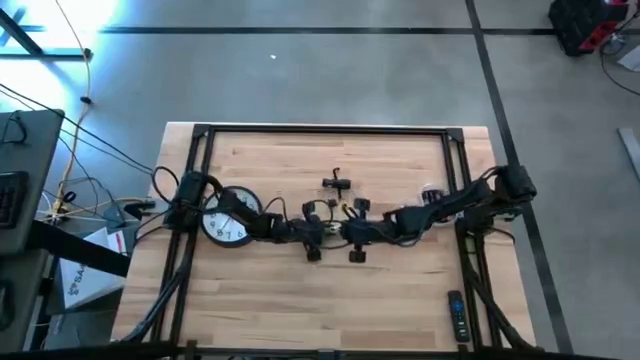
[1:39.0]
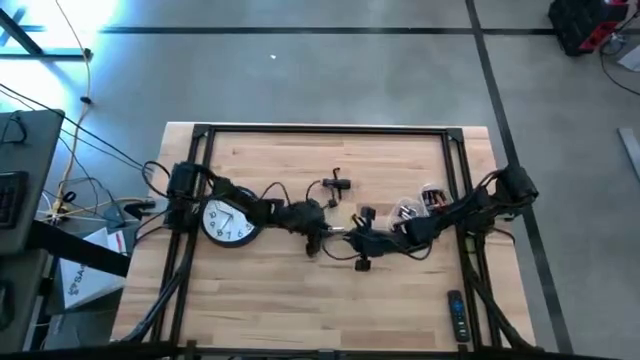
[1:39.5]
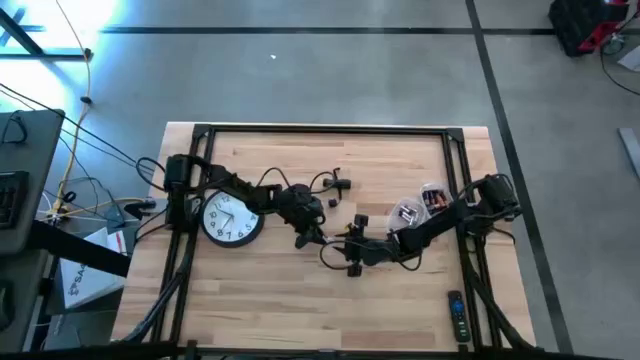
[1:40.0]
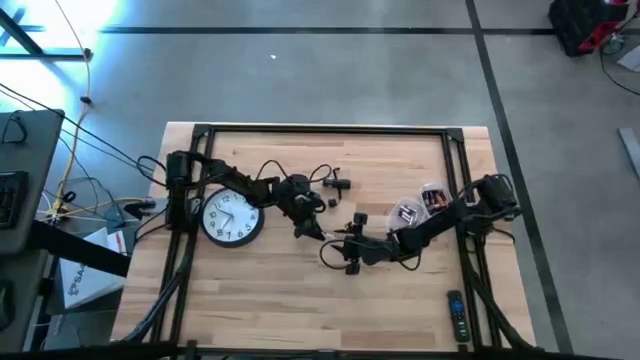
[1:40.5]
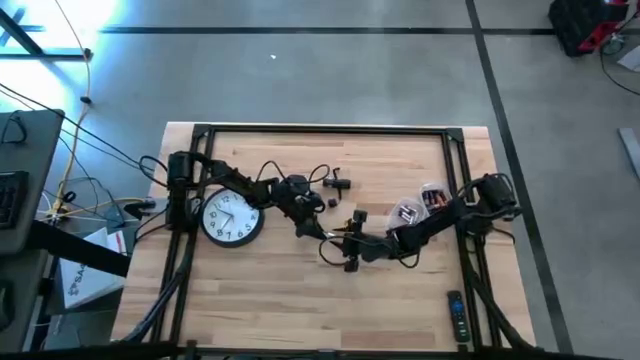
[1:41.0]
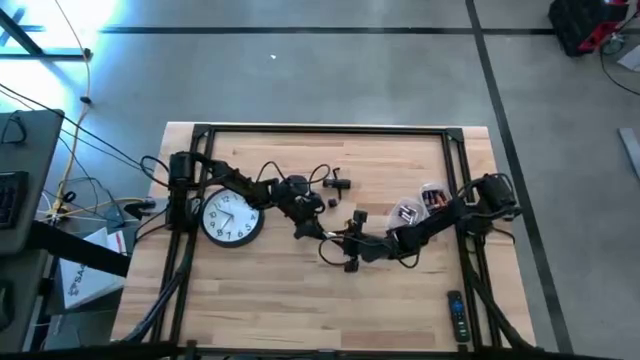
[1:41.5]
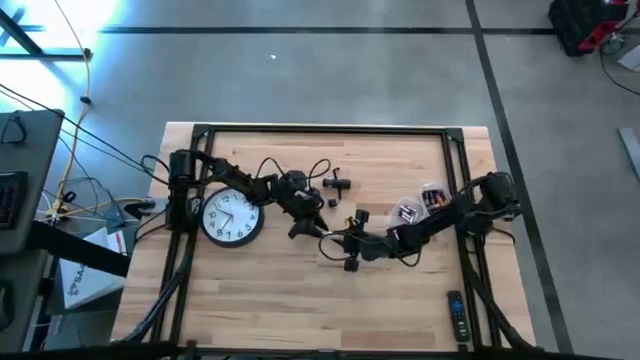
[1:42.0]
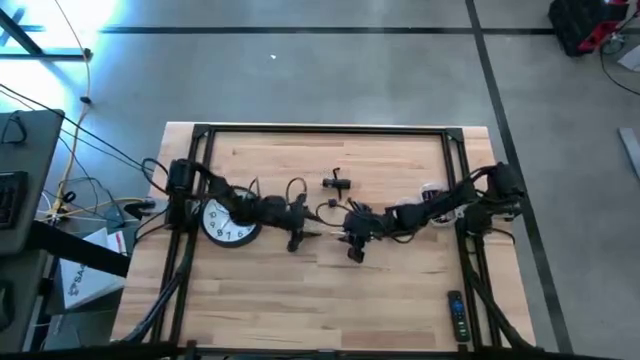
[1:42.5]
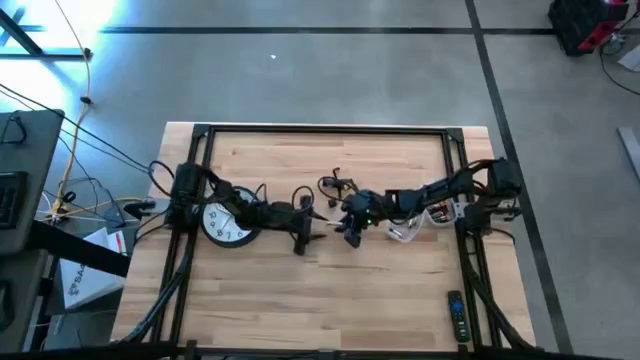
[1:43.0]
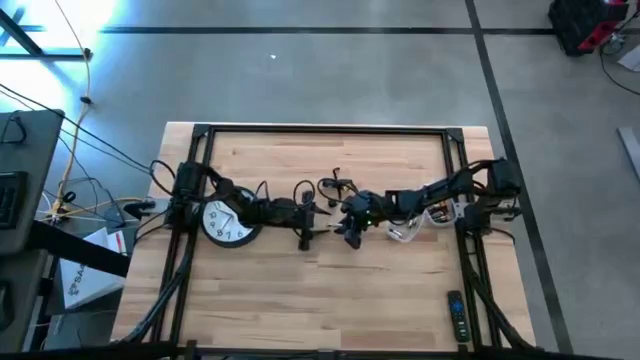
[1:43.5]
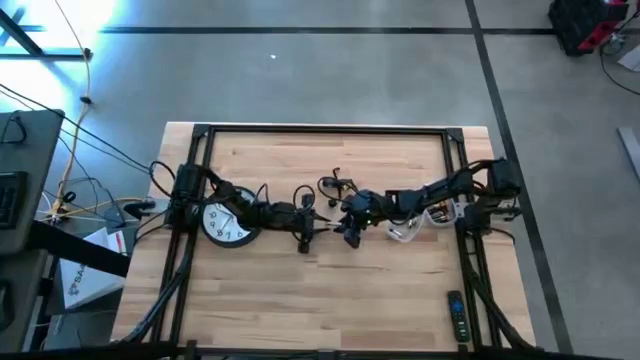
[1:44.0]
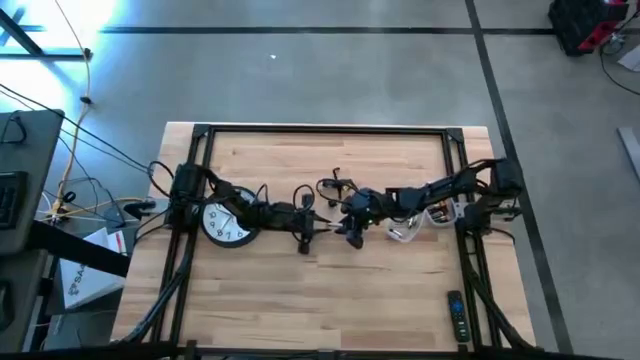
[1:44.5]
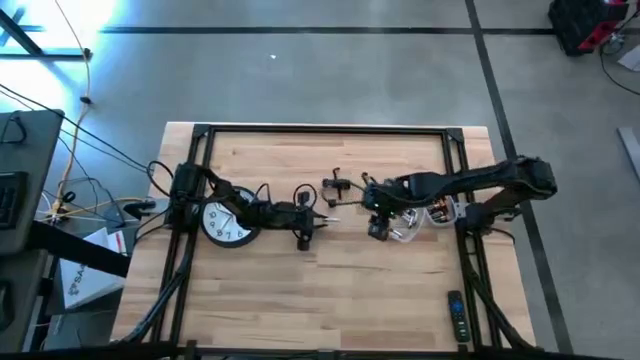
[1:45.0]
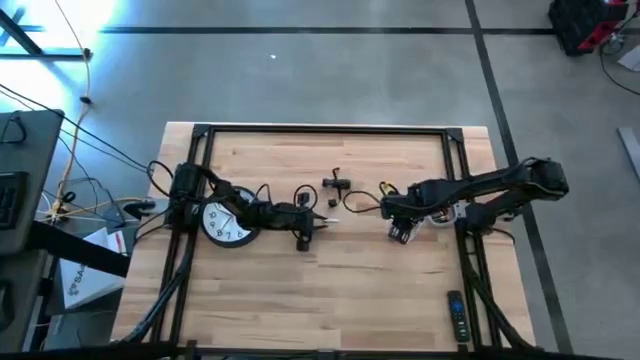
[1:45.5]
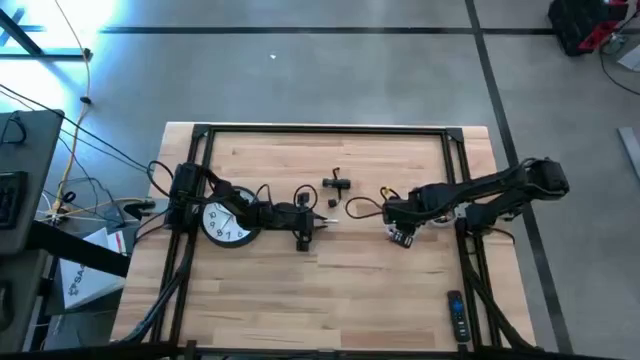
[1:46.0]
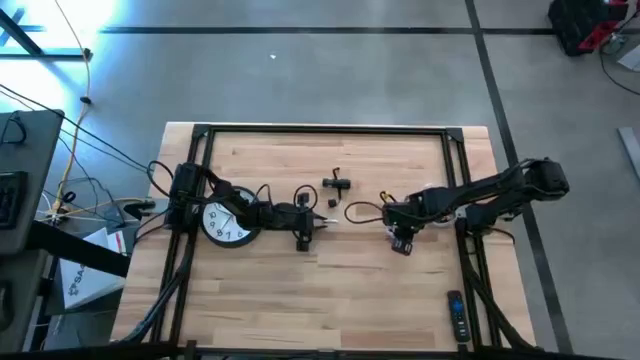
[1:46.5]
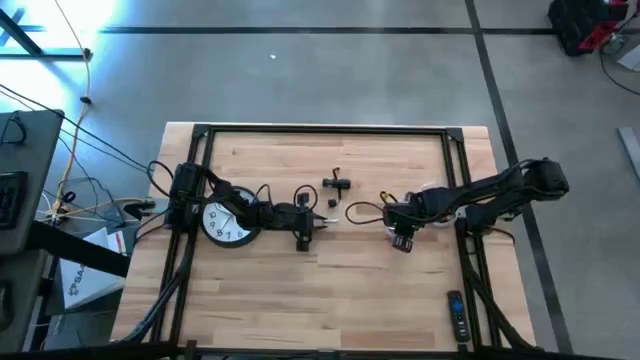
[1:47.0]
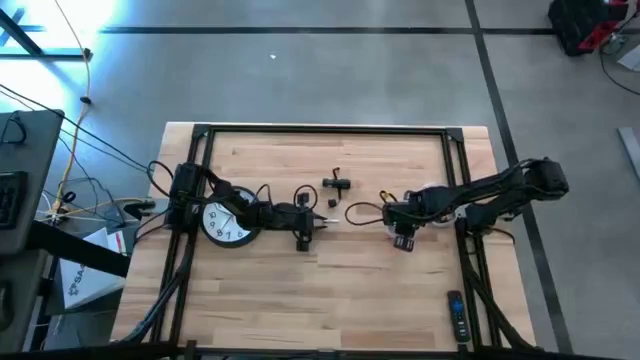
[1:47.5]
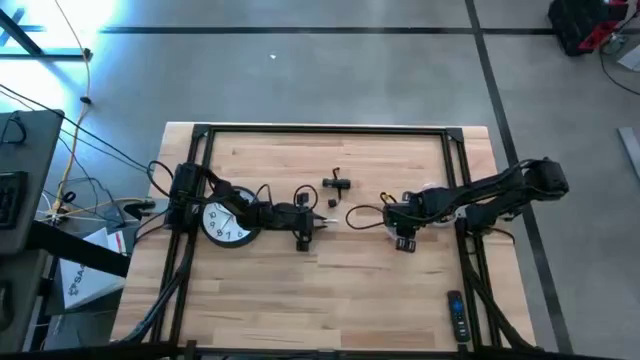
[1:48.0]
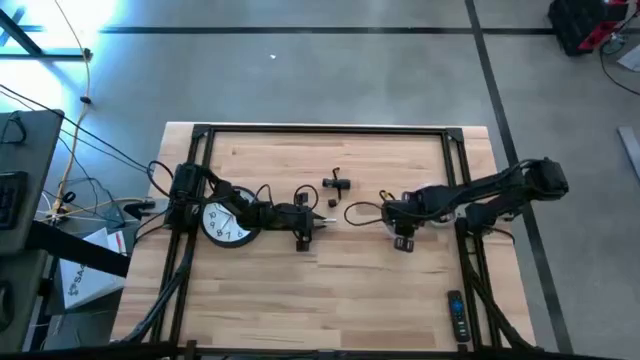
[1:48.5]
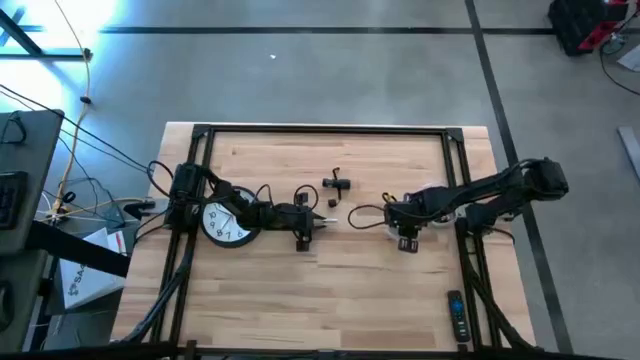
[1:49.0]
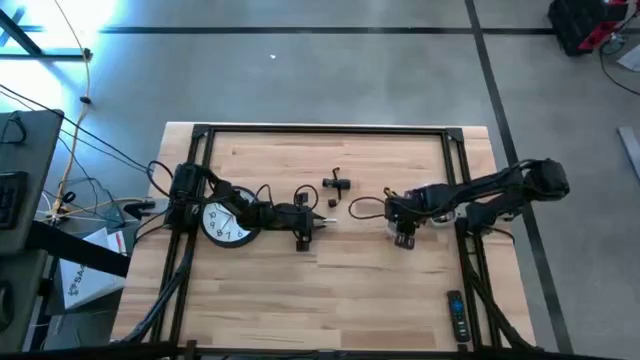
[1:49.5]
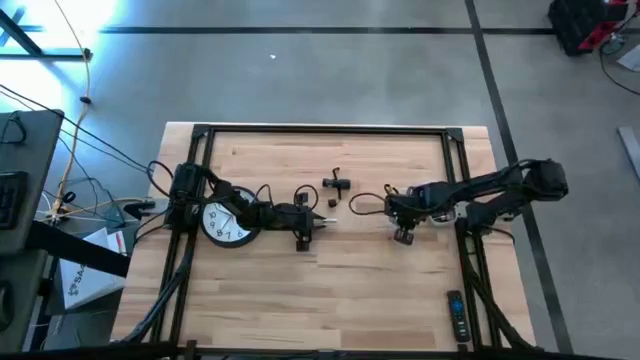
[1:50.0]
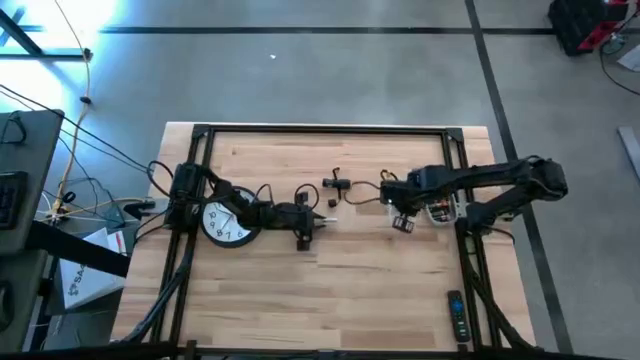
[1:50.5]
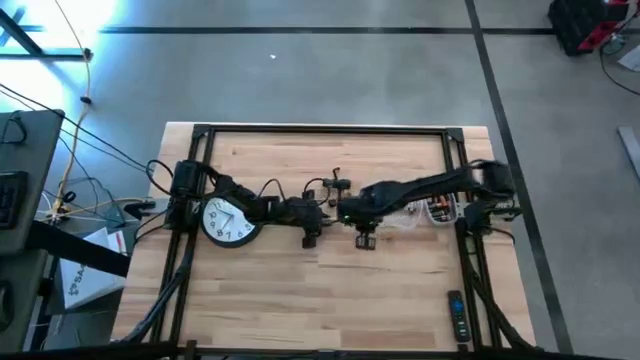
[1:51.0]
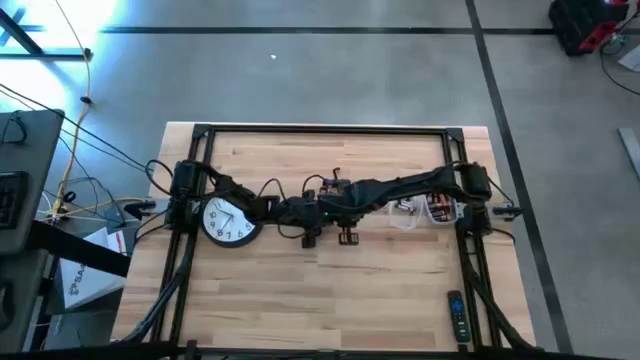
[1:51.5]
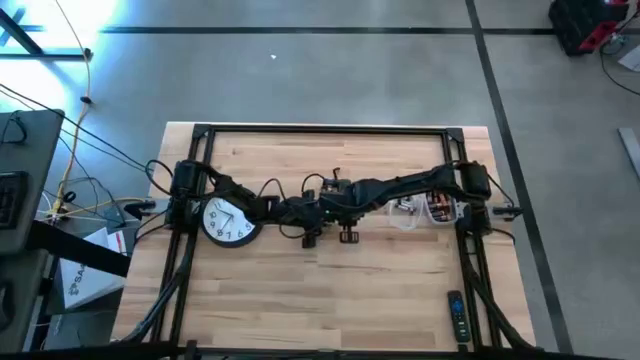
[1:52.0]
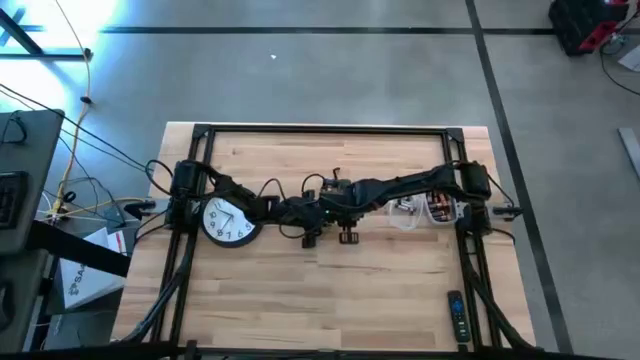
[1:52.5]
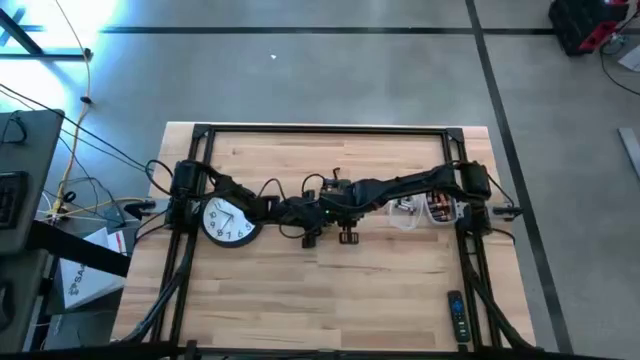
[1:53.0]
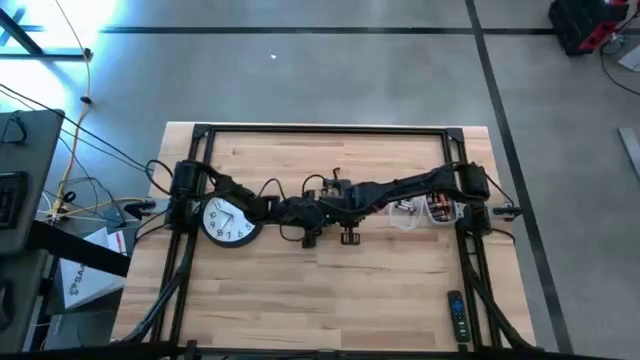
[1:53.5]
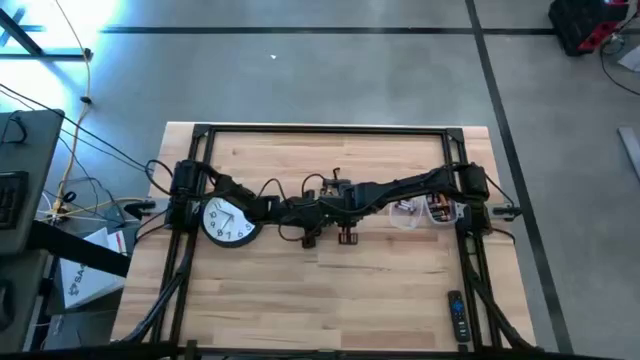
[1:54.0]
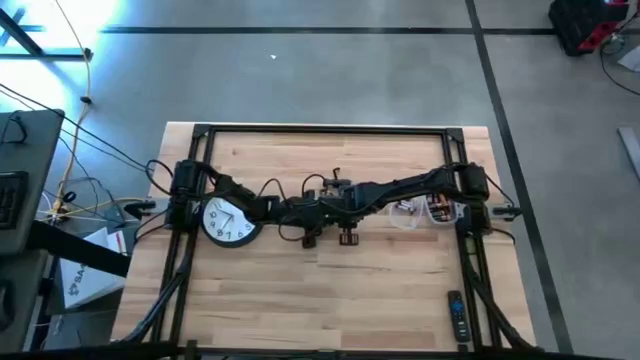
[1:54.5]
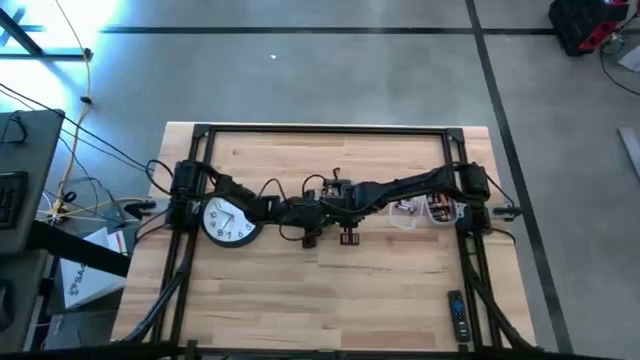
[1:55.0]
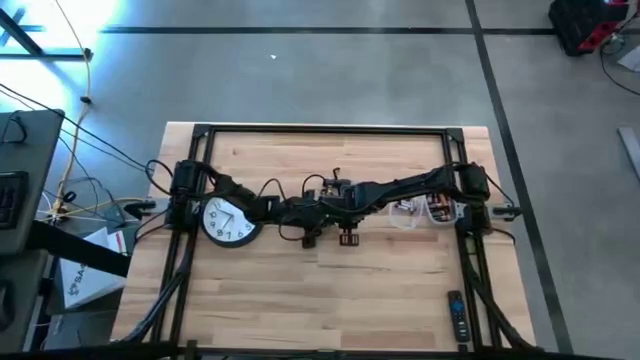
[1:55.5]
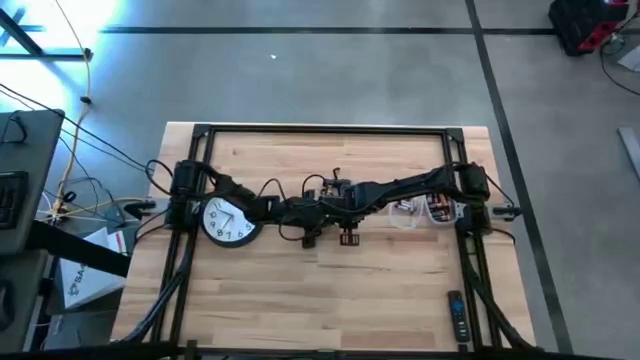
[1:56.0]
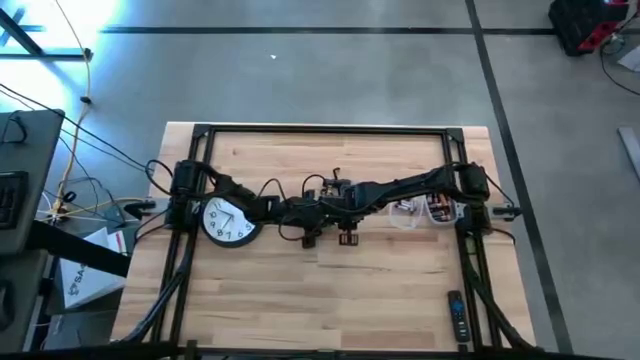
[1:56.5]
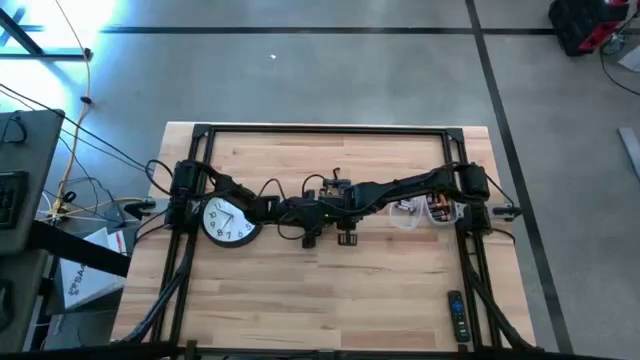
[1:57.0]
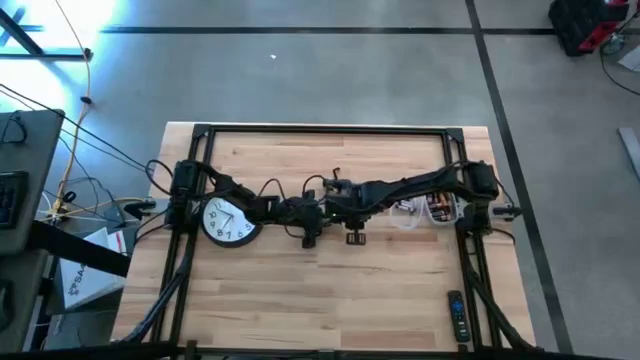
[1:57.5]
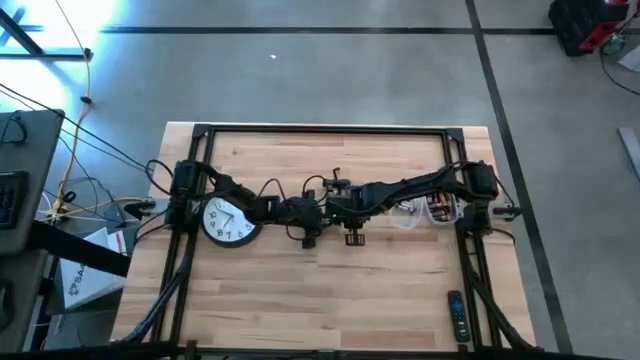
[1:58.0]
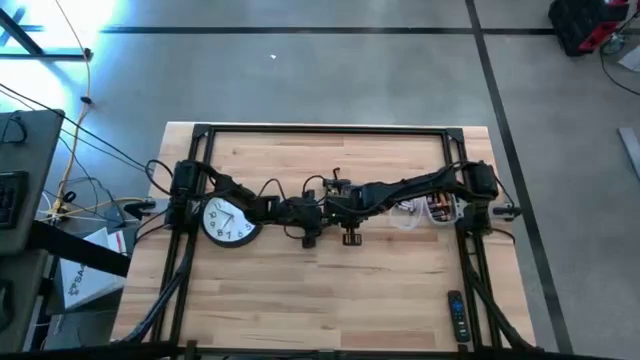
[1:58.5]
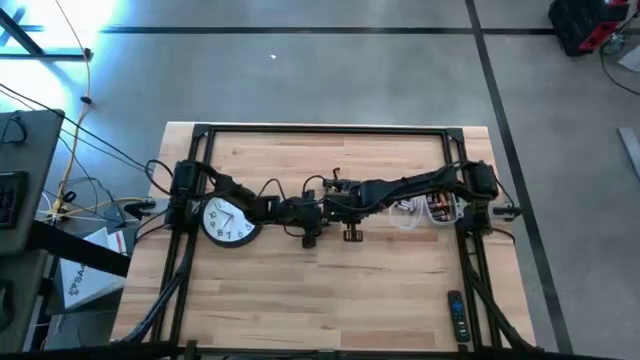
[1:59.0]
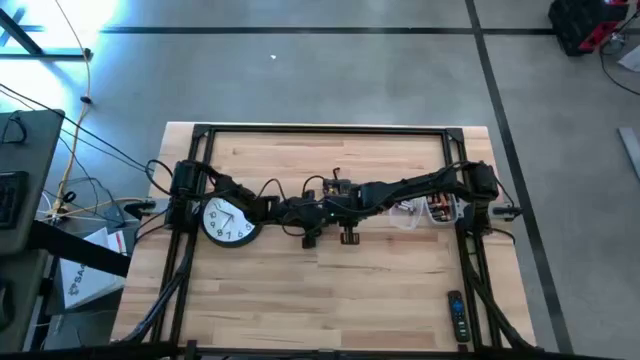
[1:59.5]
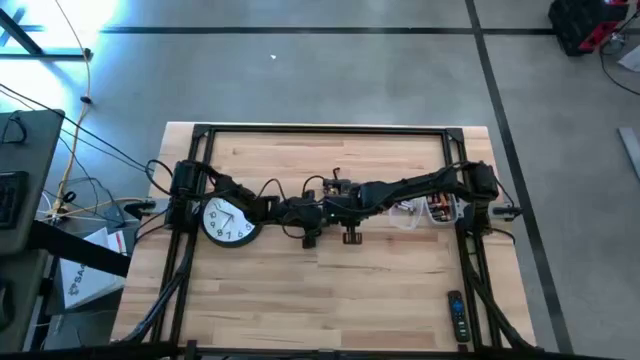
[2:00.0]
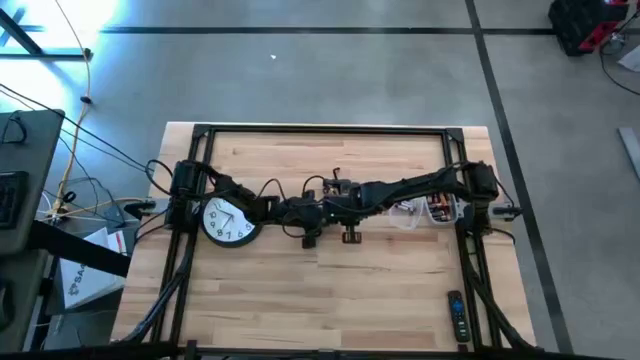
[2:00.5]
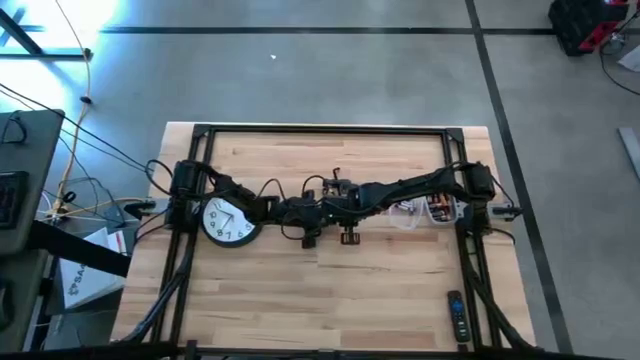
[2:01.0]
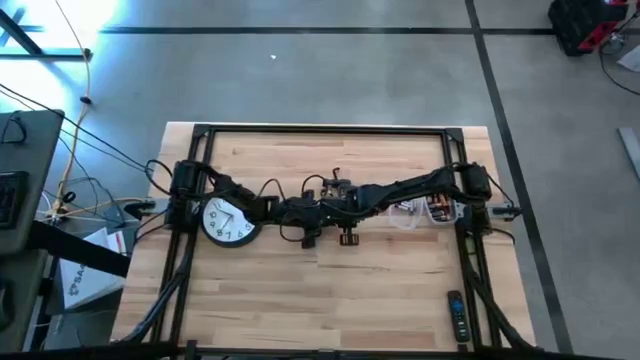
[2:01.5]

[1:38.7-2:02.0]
Task: Insert battery
Insert the silver battery into the white battery case
